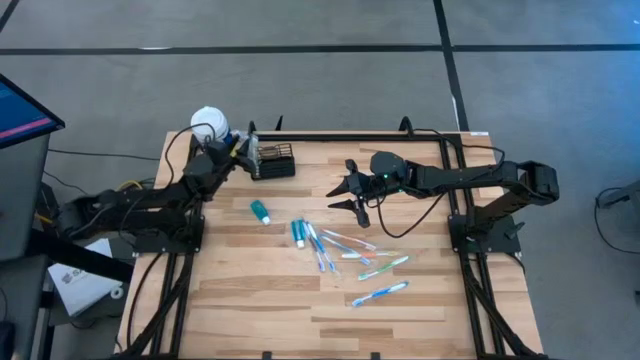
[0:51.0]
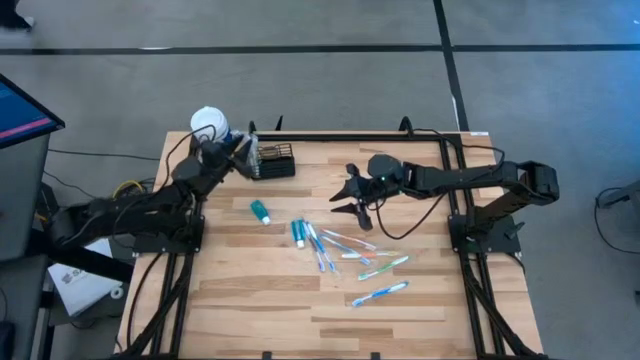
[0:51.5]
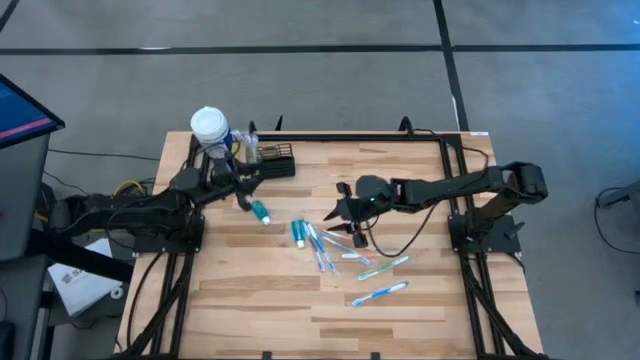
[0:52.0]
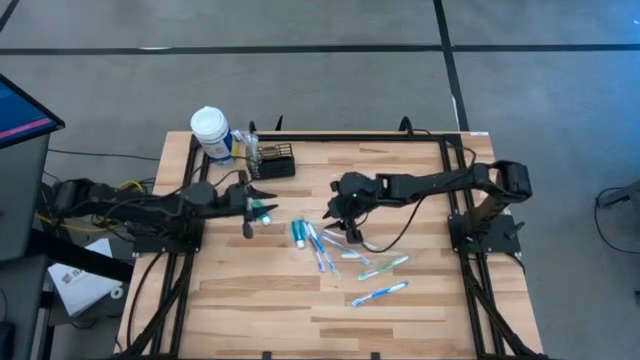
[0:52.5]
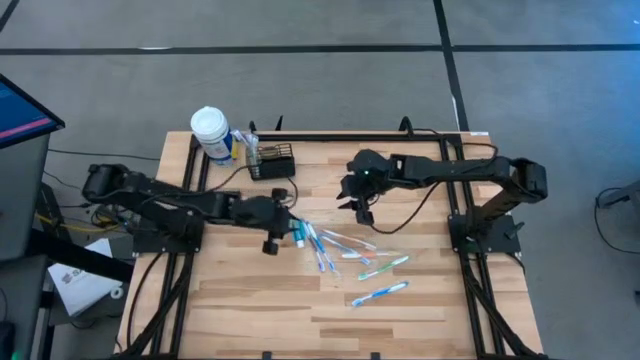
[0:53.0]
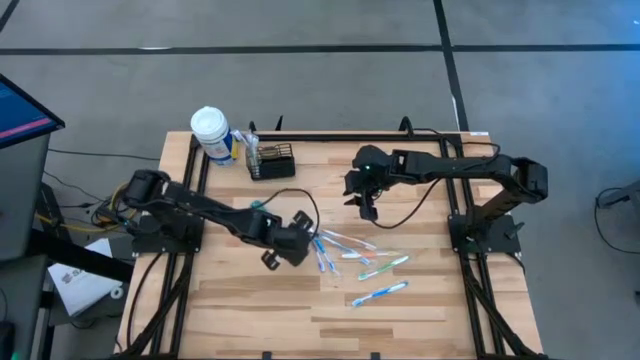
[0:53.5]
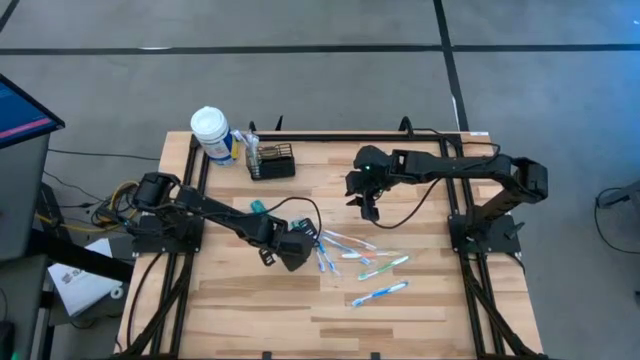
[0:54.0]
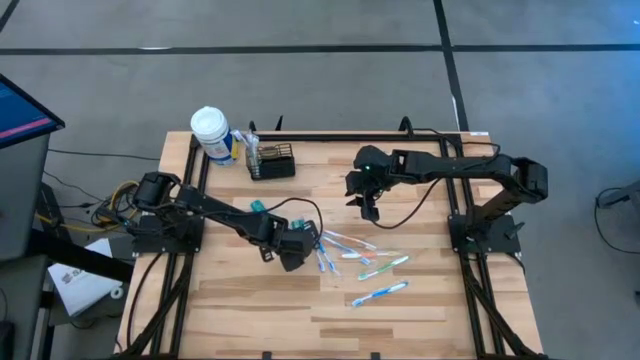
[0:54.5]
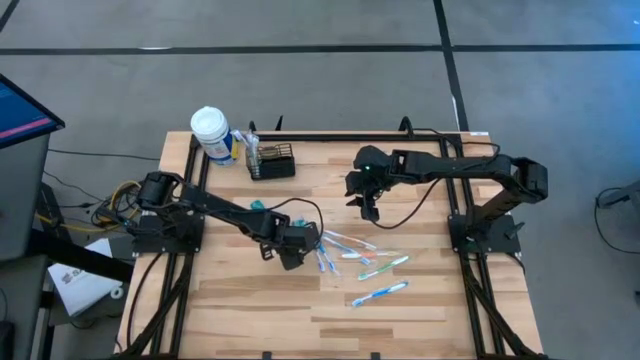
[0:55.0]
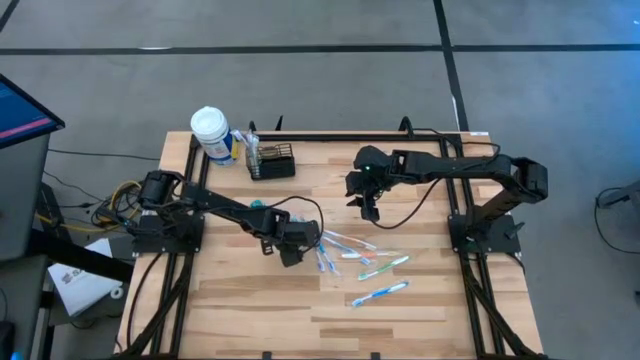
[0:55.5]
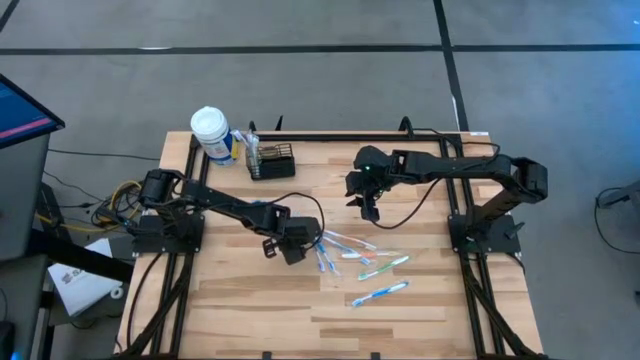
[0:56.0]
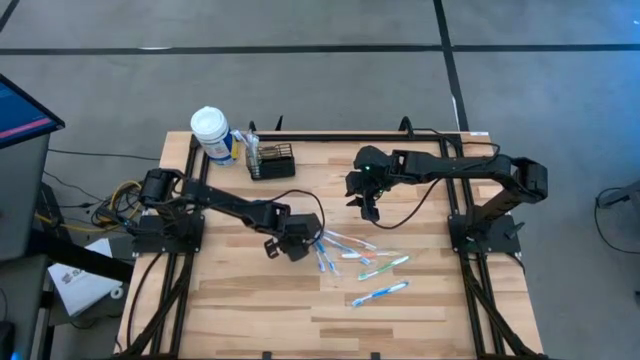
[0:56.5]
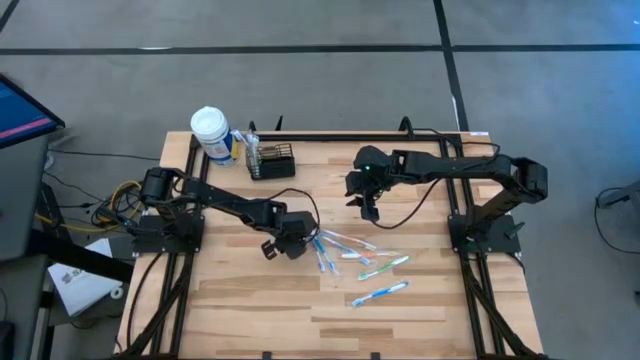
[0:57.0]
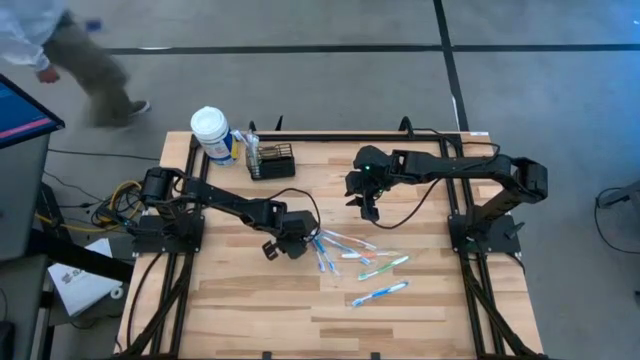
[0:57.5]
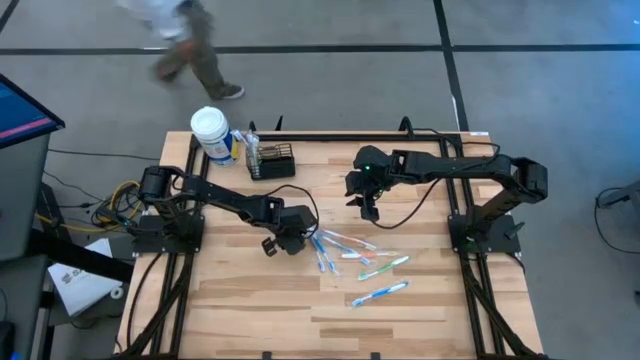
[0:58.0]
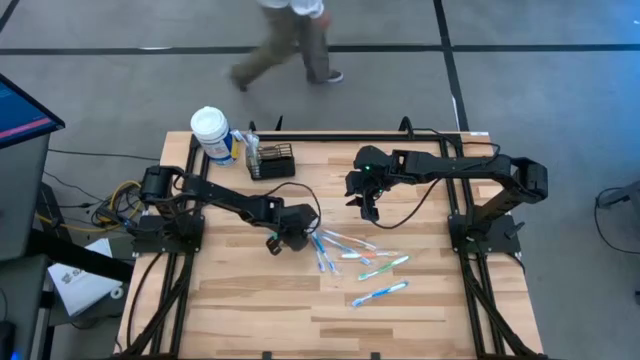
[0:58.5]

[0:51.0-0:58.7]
Task: Pick & Place toothbrushing station
Put the bottom blue mouthwash into the black wire organizer

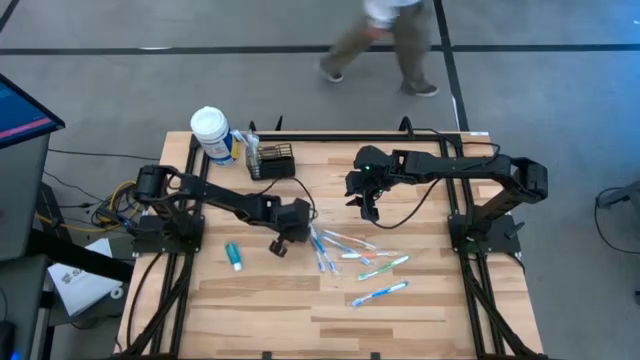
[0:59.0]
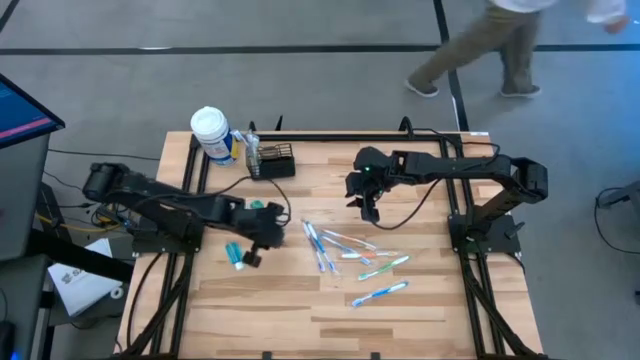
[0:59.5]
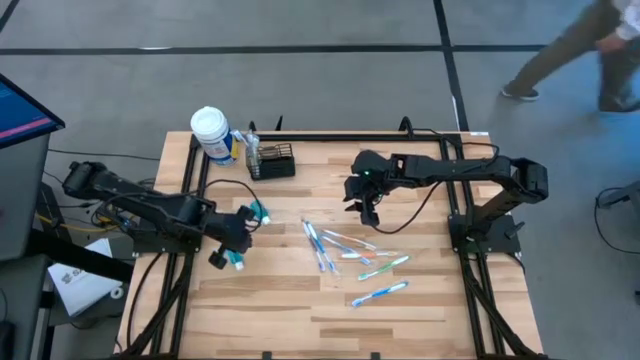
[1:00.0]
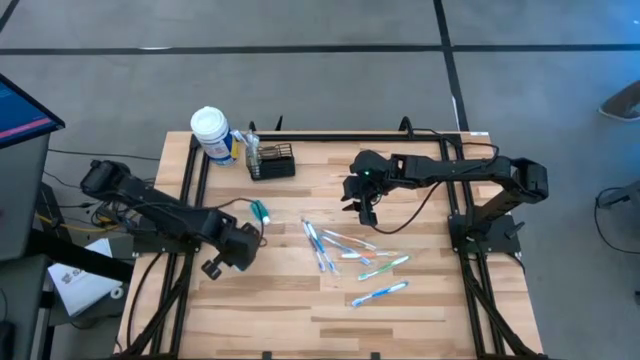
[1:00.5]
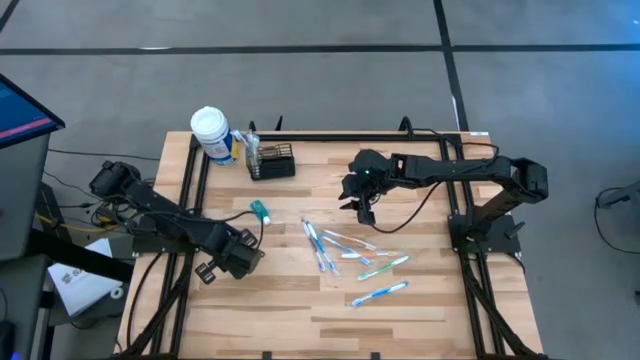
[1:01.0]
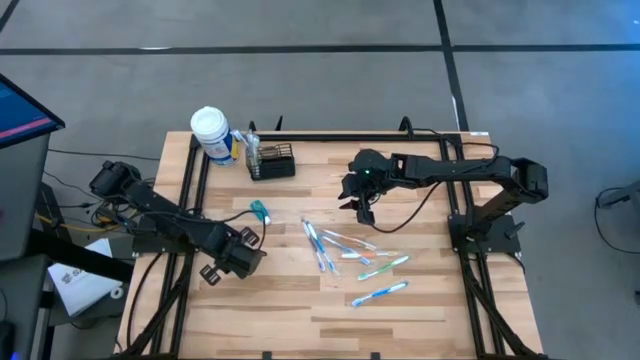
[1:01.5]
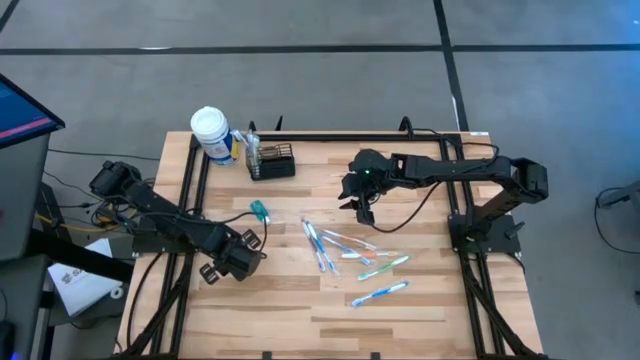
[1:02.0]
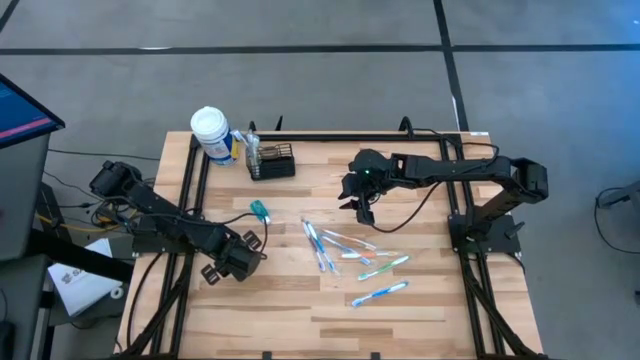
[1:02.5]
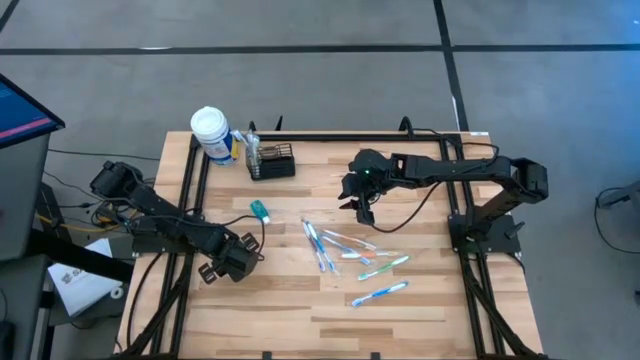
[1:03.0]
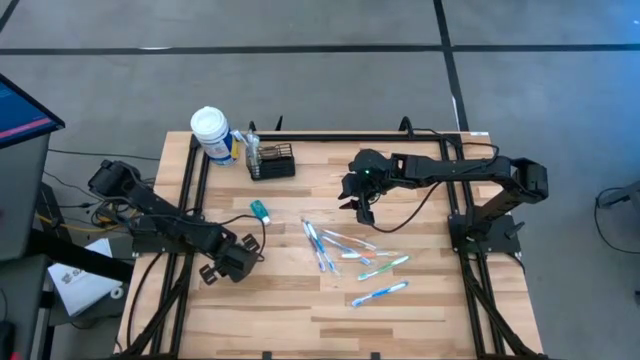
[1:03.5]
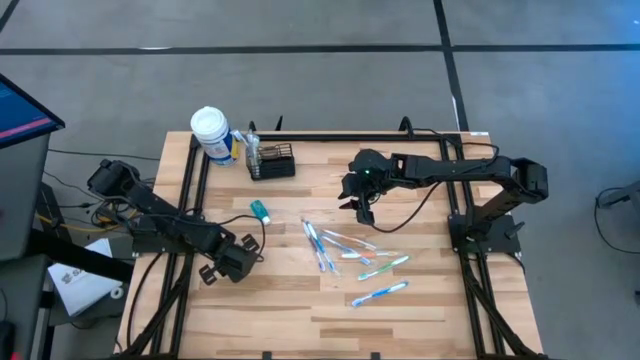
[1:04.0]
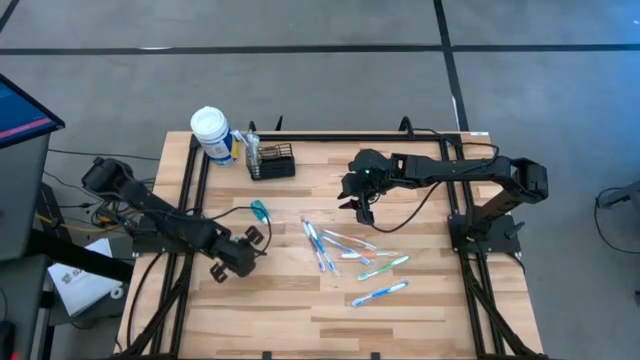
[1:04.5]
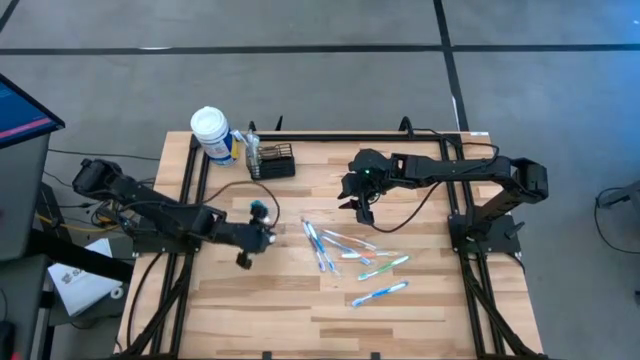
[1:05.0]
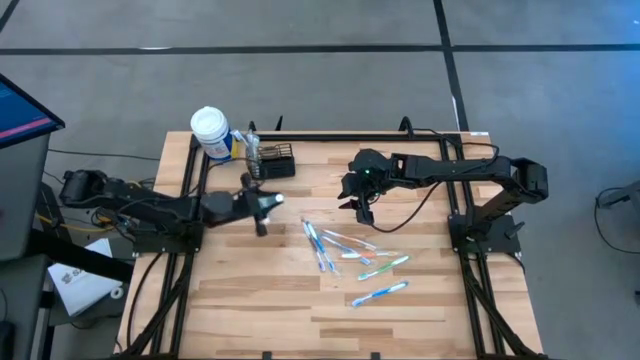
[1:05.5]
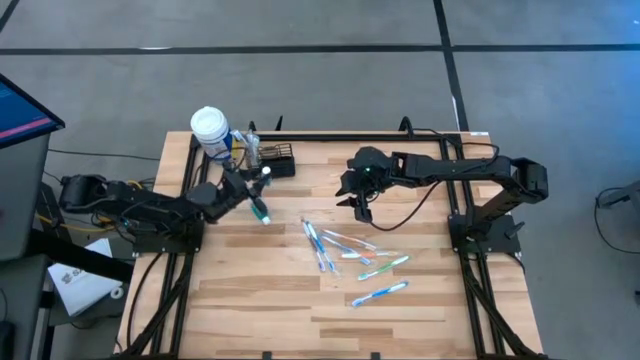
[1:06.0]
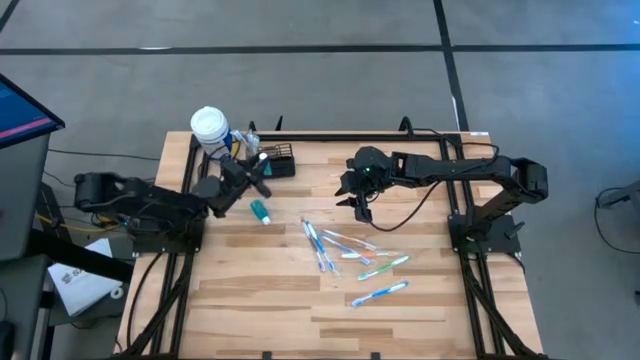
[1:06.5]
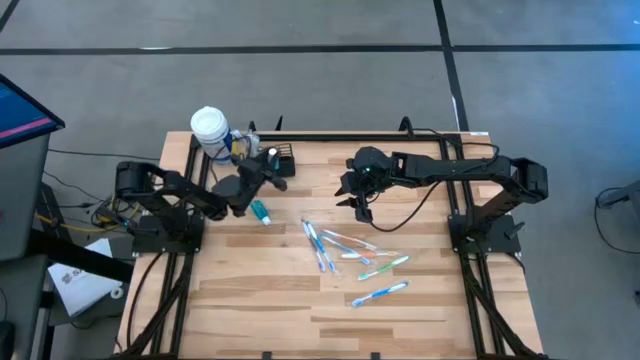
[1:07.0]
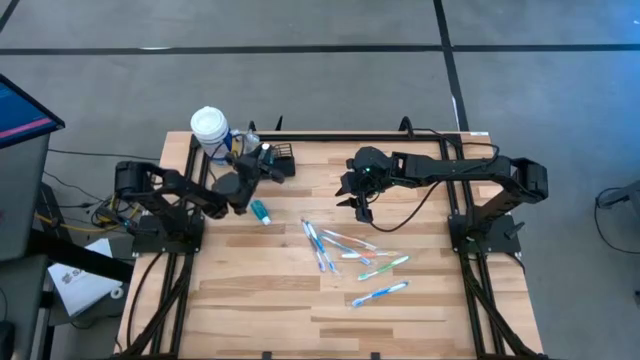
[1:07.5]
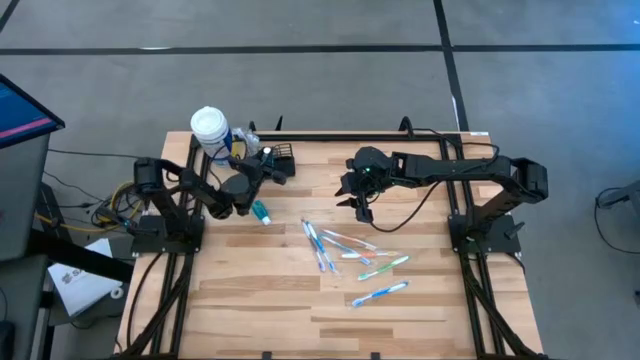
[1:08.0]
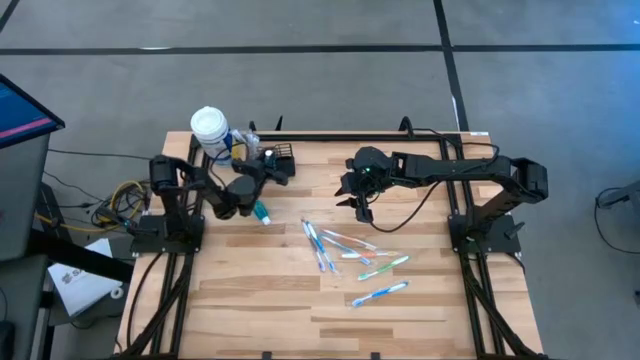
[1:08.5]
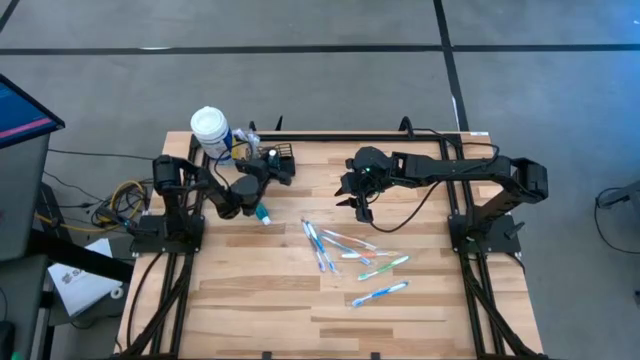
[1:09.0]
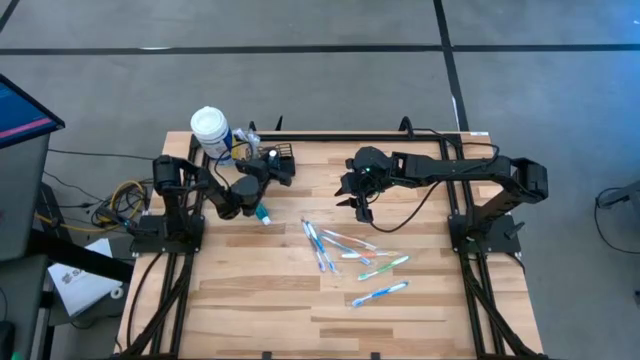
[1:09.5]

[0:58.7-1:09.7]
Put the bottom blue mouthwash into the black wire organizer

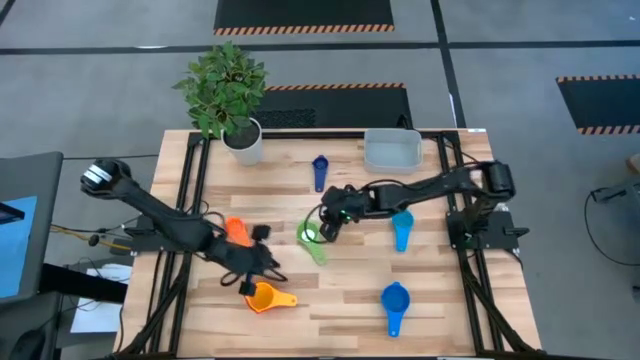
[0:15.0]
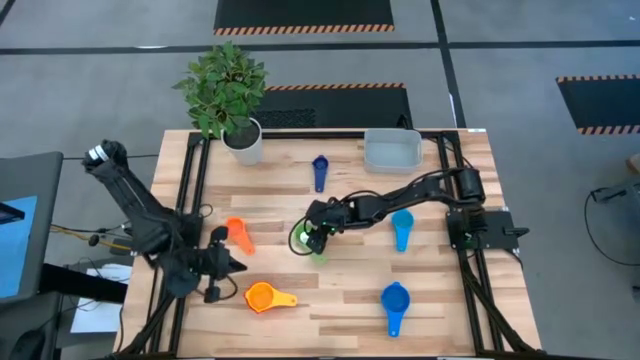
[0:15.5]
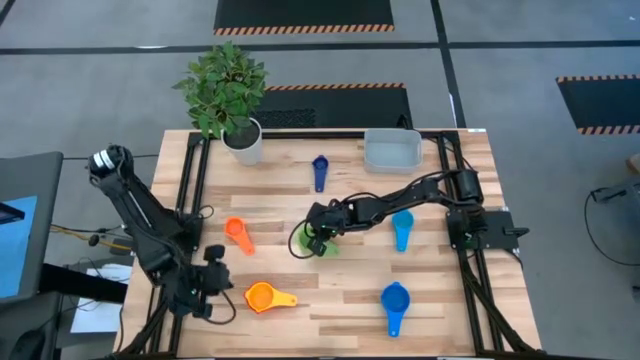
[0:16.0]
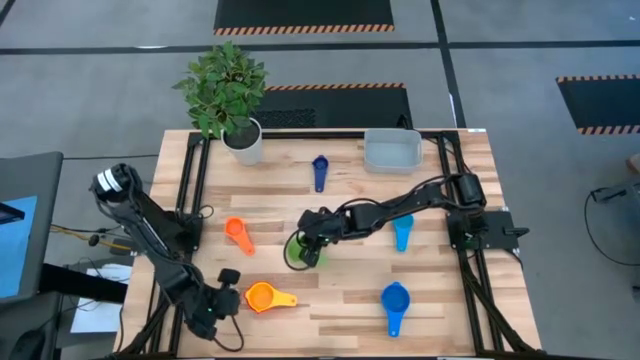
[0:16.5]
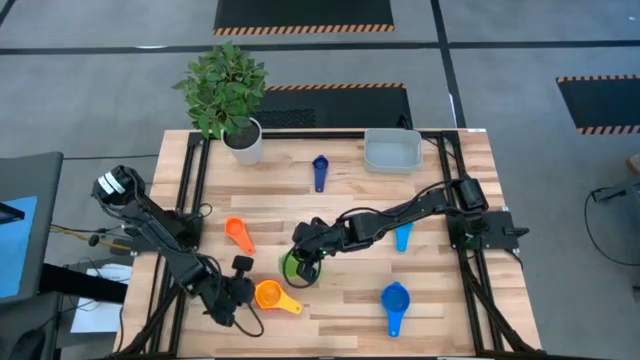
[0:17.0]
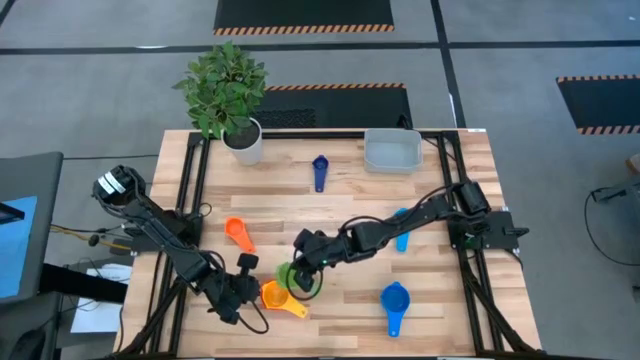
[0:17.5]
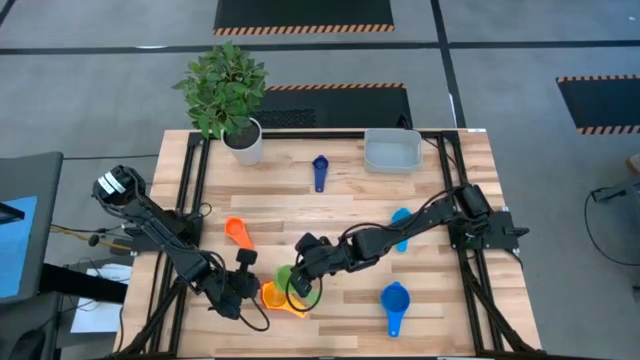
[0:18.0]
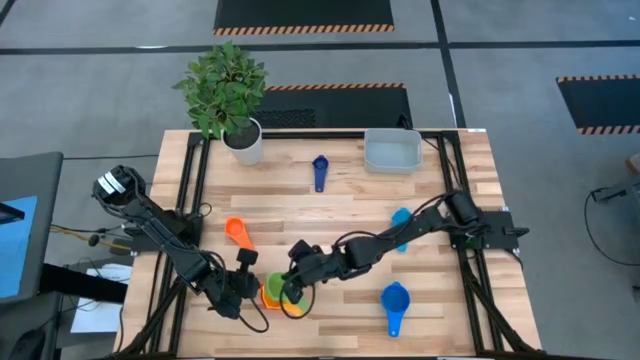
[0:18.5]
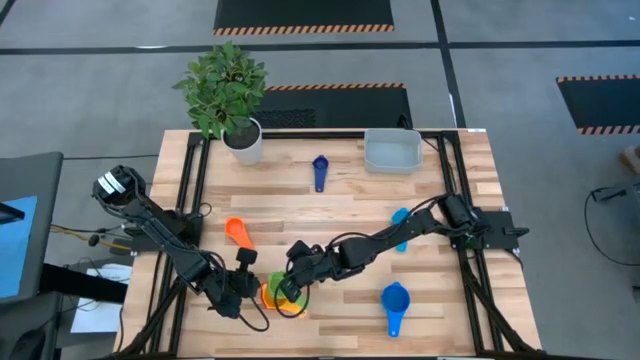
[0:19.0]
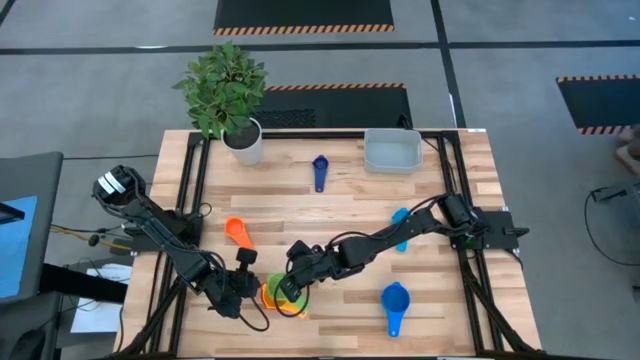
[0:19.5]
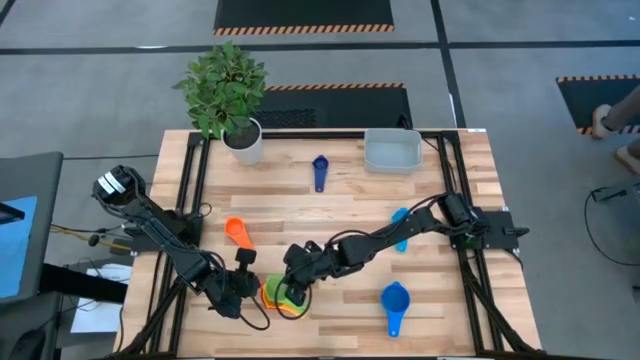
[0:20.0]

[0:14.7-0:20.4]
Task: Nest measuring cups in basket
Stack the green measuring cup on top of the yellow measuring cup
